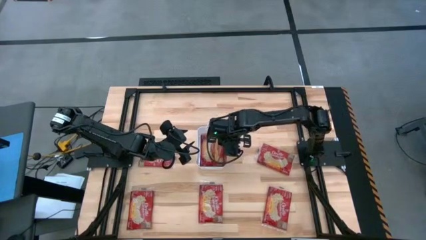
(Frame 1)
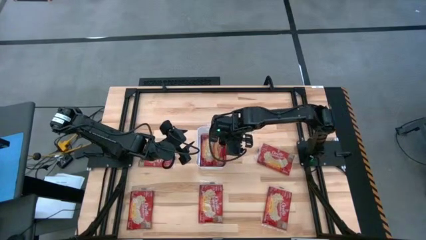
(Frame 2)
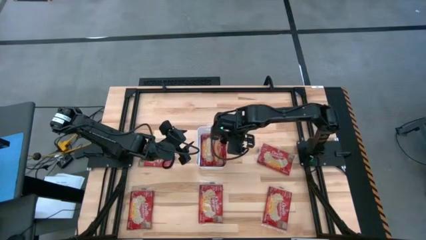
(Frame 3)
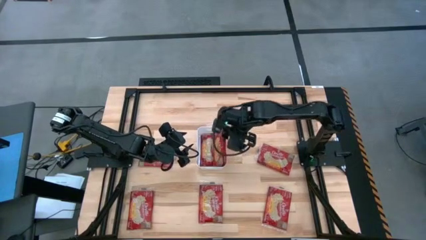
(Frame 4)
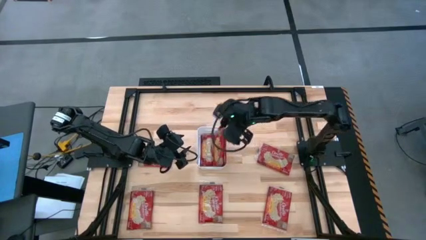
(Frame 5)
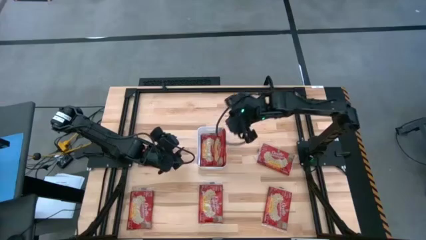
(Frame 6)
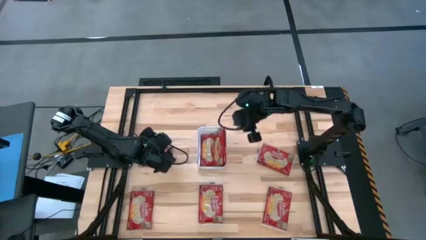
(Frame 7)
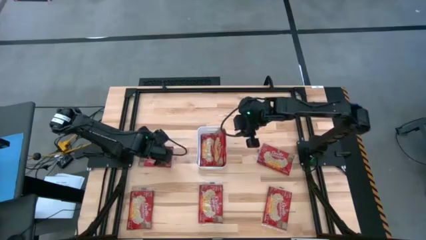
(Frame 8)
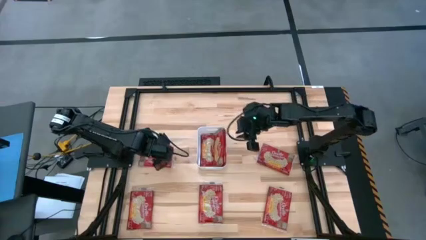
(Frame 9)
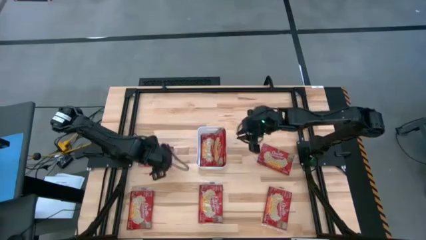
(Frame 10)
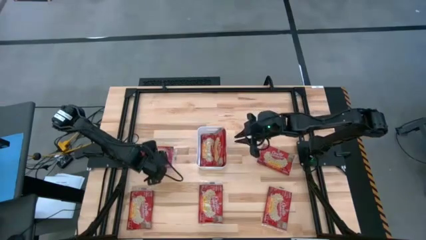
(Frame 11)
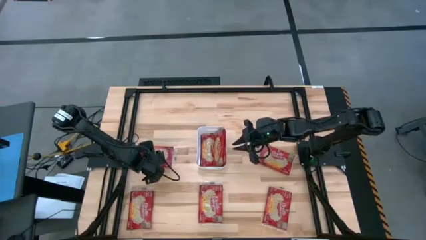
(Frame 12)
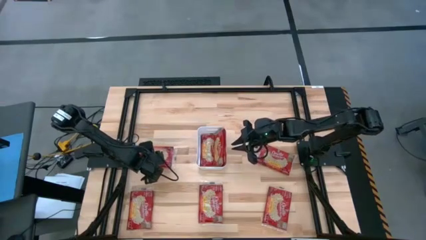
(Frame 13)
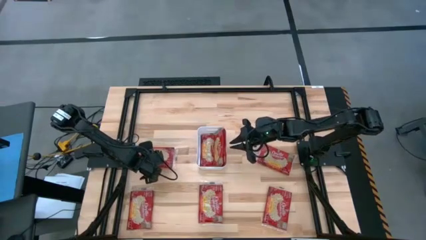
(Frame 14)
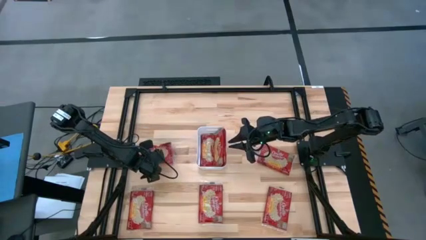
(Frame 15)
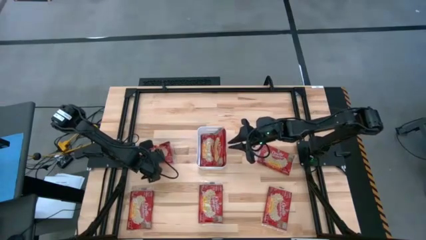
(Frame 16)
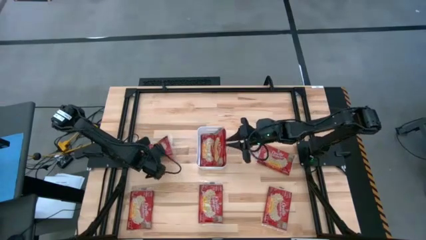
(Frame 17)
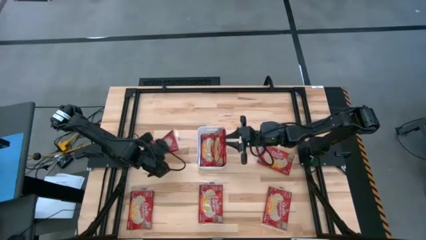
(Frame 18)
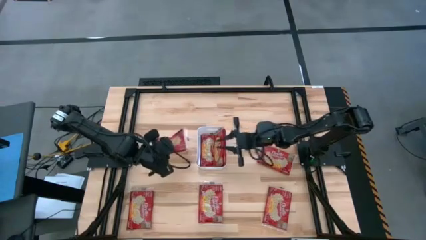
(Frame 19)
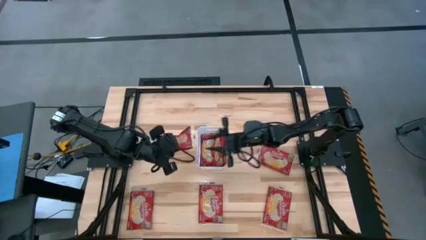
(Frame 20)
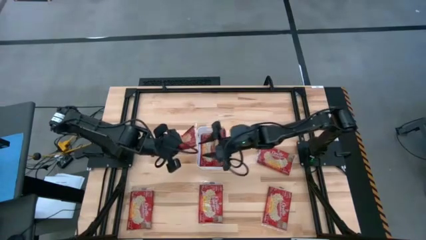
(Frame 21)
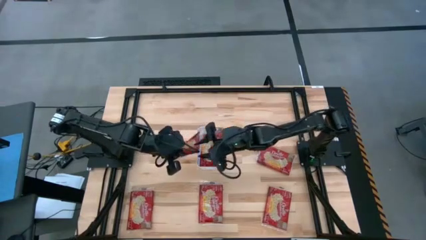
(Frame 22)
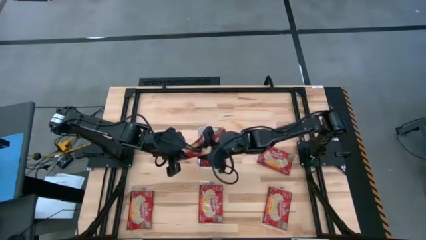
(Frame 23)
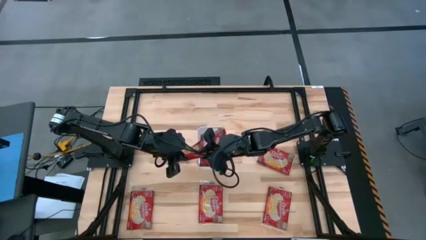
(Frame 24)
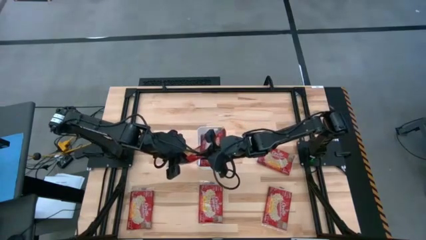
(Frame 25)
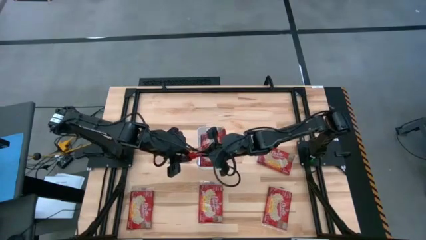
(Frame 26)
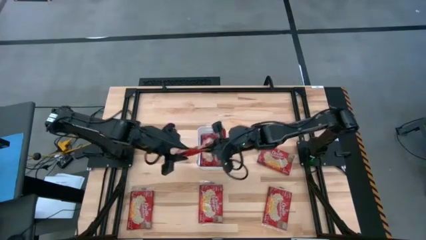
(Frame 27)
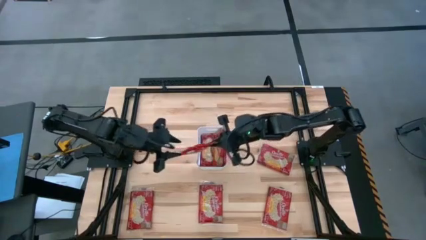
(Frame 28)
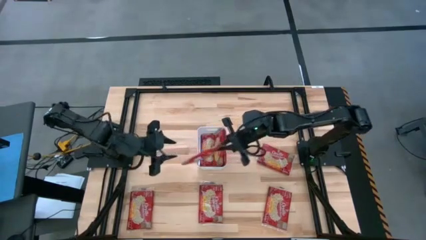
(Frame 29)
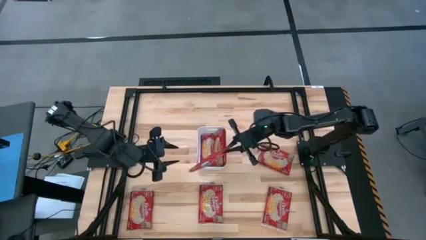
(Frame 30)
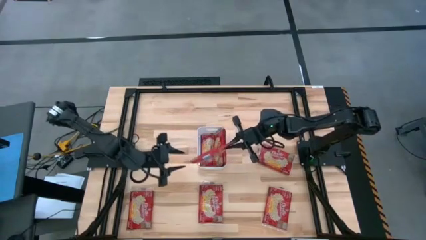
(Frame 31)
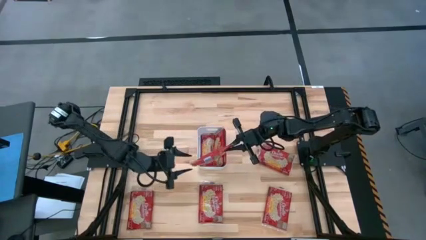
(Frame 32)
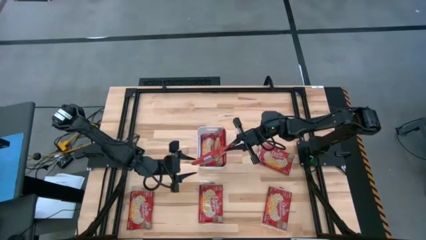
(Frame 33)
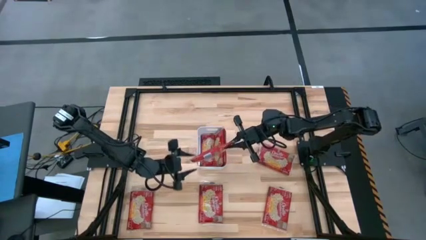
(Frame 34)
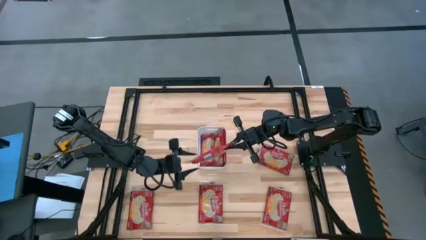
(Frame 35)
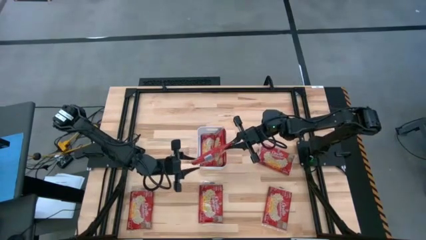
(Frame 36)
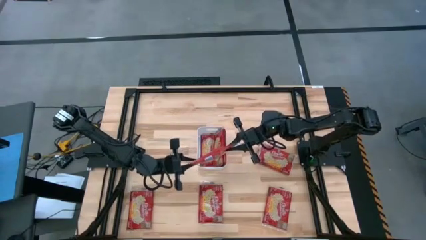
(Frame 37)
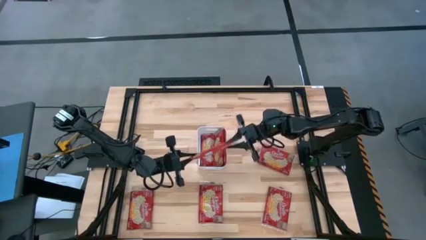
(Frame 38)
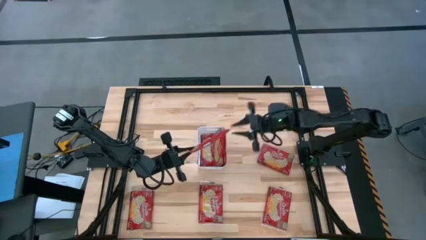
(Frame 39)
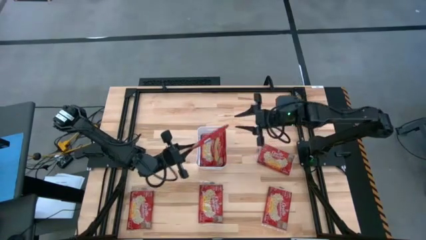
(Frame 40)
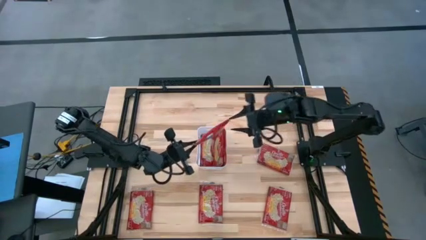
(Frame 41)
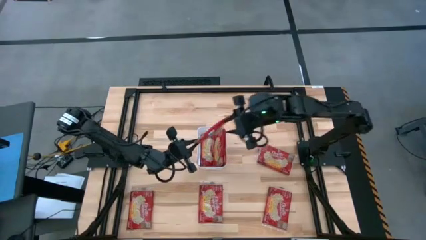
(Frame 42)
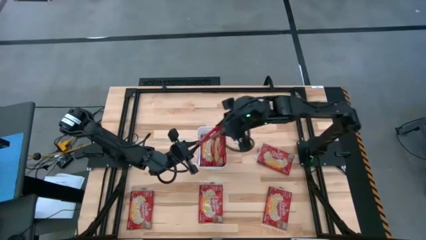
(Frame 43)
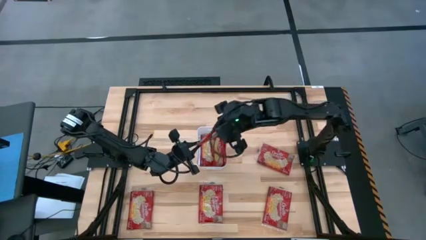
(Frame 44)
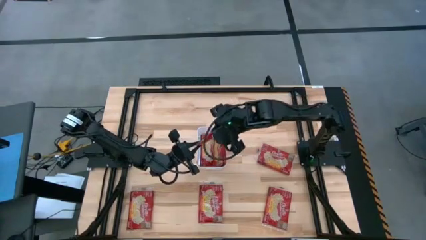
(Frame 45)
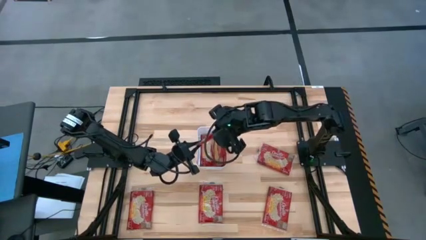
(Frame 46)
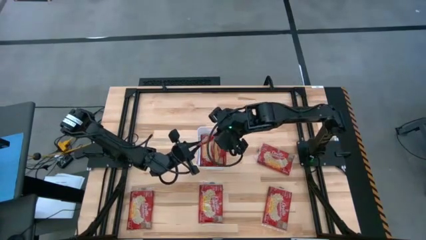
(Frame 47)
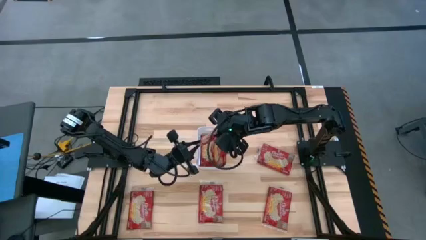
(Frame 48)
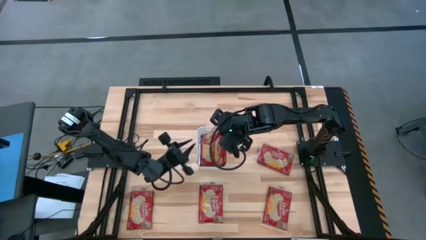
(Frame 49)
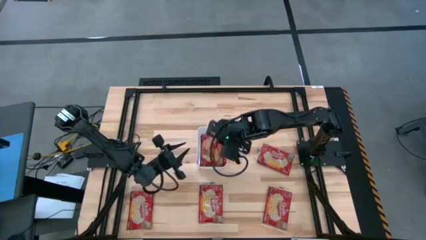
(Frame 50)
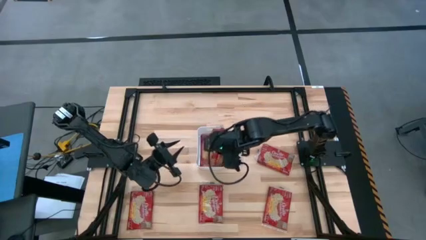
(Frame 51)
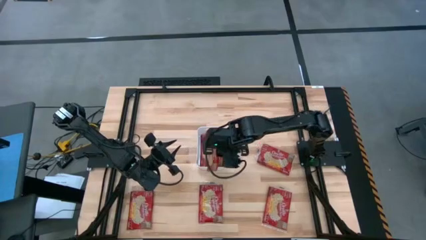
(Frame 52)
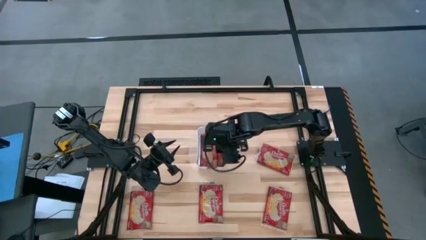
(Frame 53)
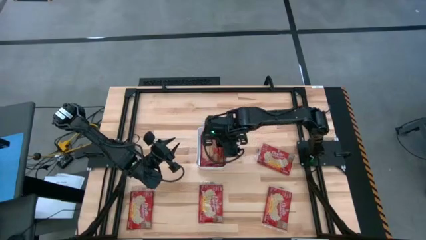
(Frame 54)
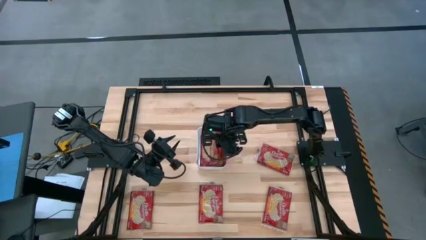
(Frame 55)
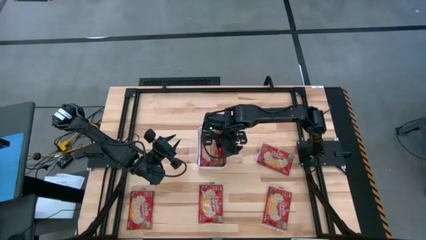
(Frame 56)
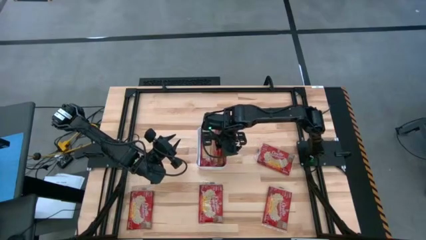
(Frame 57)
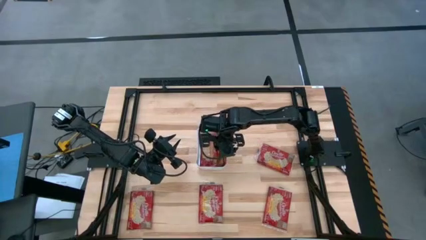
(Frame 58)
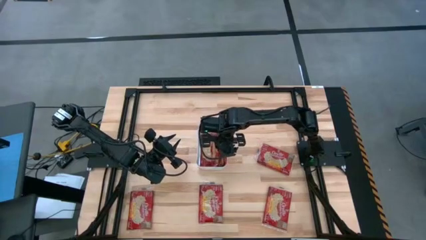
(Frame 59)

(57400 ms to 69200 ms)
Task: Sort popcorn bags into baskets
Put the red popcorn bag into the white bin

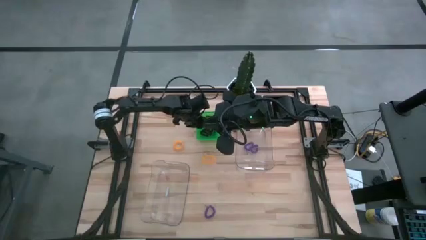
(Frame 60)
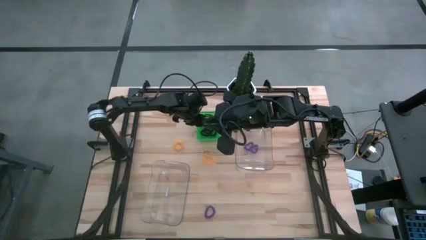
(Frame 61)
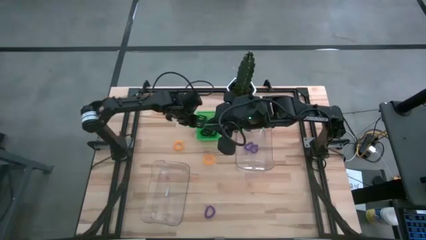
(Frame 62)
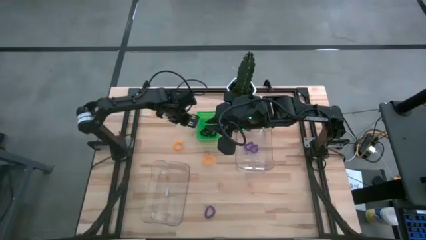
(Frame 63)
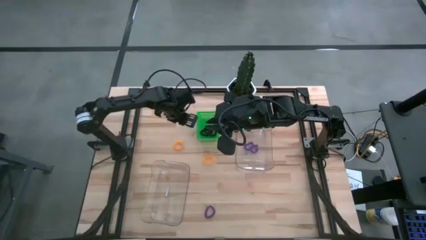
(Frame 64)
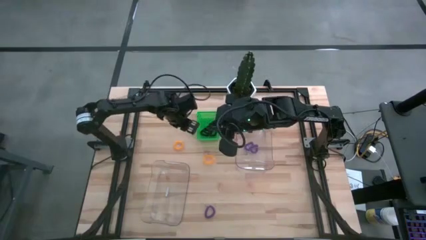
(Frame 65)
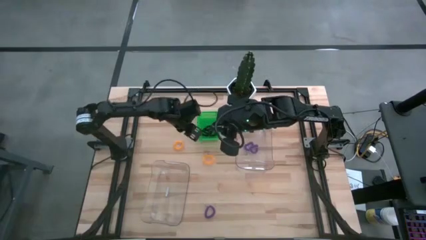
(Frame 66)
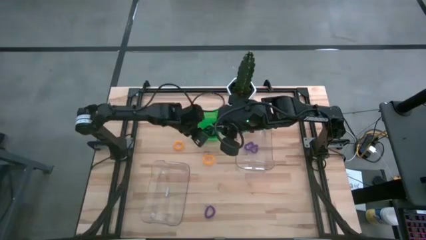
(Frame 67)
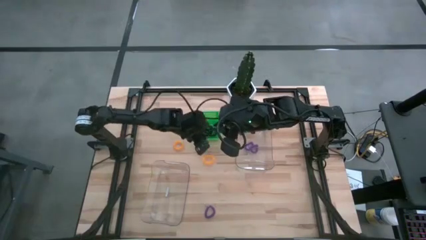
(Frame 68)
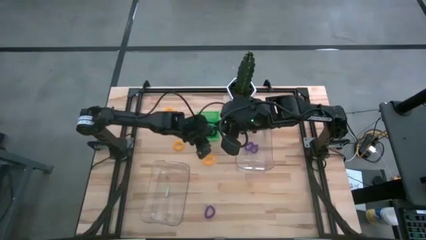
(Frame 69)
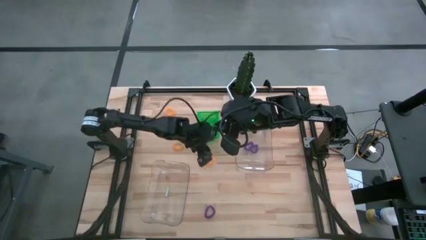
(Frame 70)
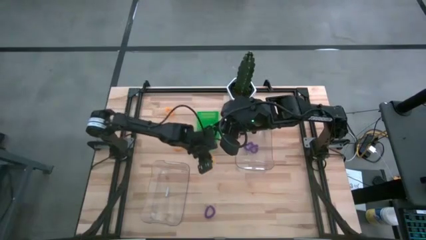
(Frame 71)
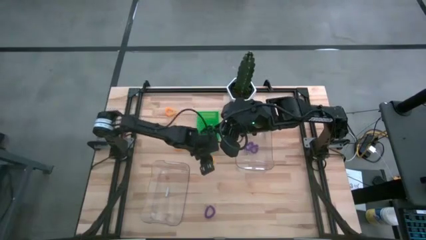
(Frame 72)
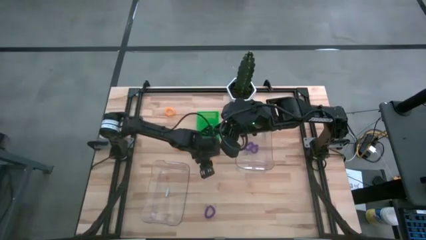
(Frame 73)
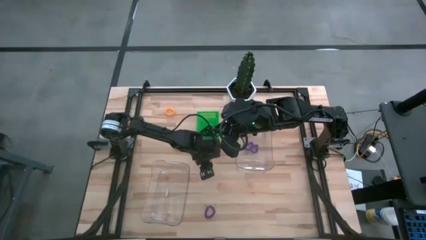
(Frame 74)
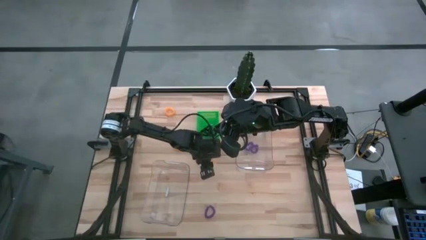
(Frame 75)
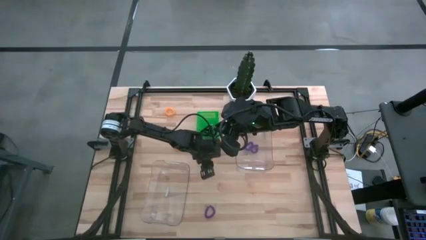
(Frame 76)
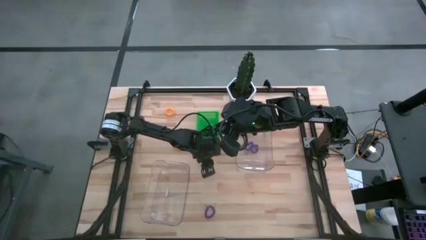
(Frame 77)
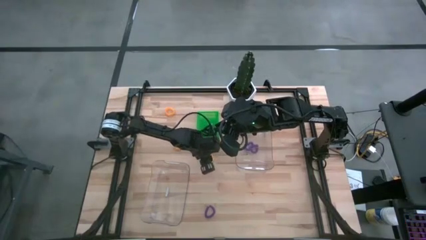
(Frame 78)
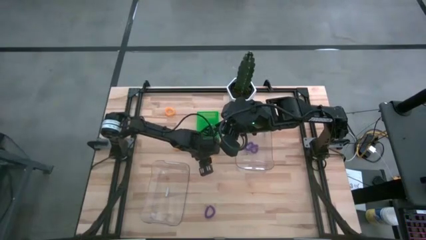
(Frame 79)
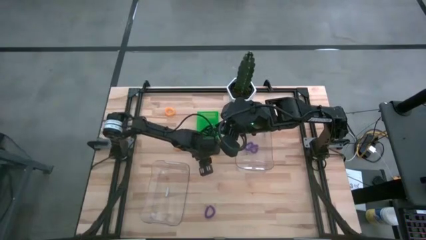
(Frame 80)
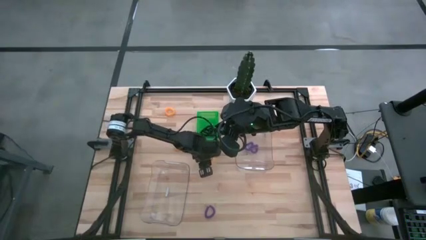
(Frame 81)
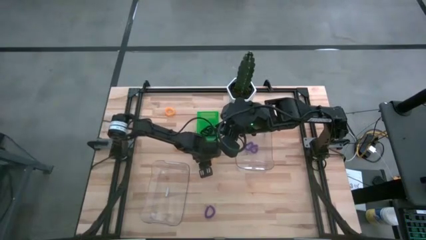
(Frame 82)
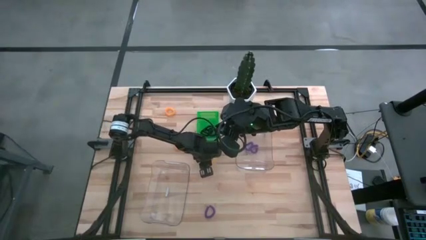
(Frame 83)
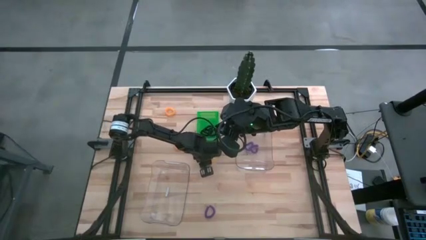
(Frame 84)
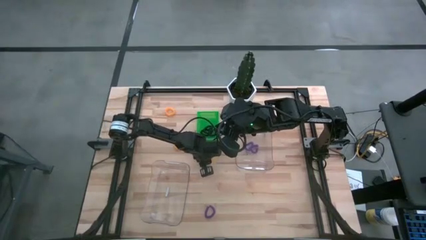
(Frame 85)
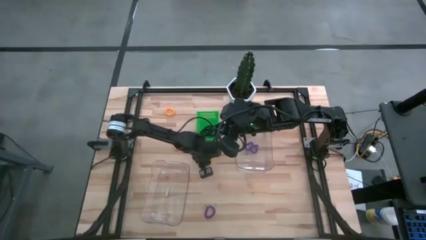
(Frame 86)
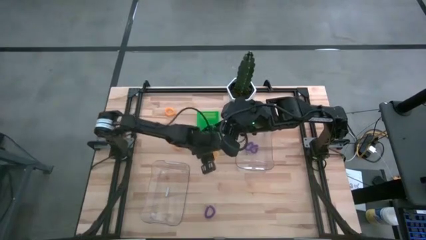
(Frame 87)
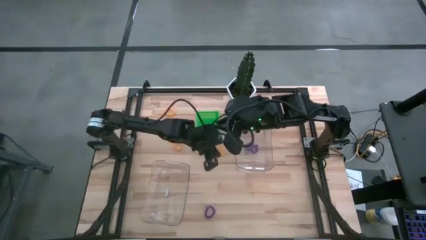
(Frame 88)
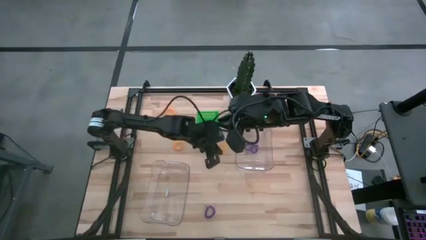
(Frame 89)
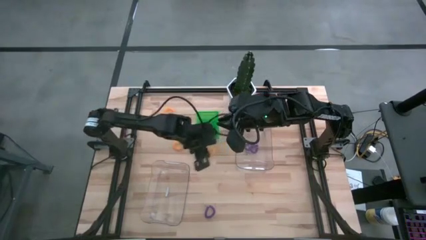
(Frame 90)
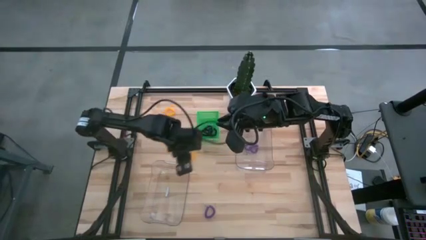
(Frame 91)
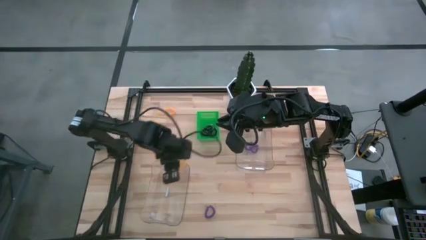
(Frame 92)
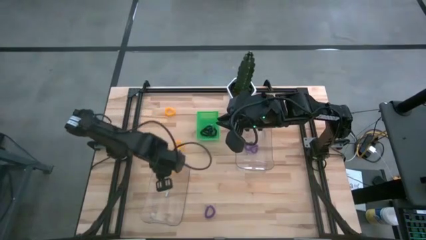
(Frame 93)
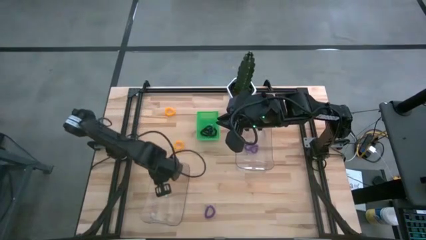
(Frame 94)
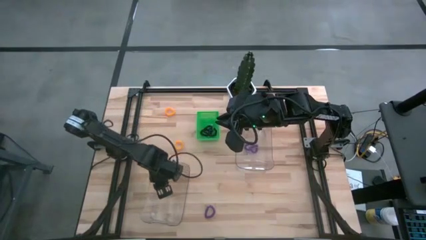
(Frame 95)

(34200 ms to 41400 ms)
Task: Sort spring keychains
Put the yellow spring keychain into the bottom transparent bin
